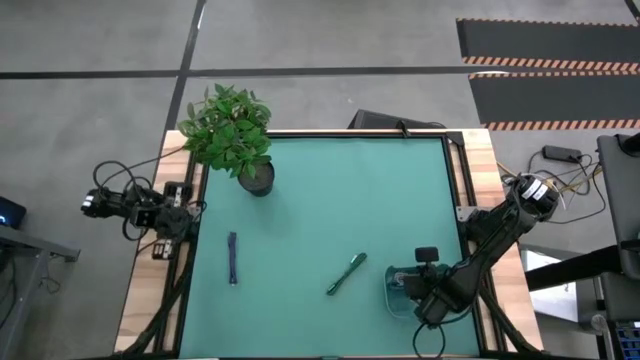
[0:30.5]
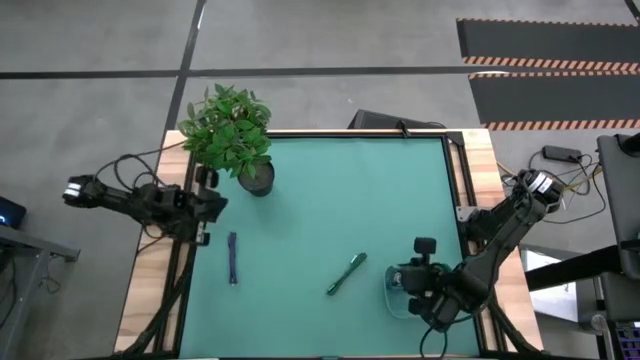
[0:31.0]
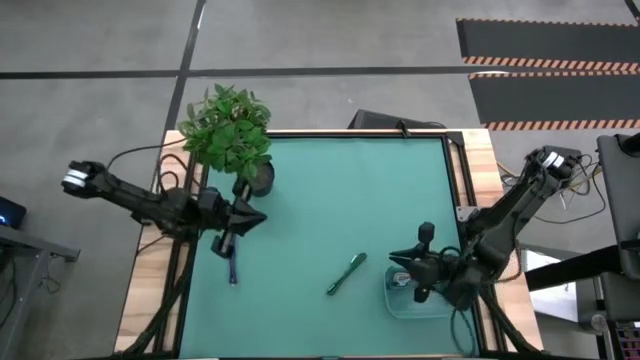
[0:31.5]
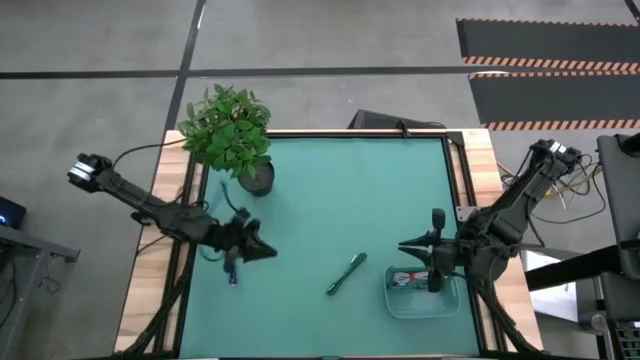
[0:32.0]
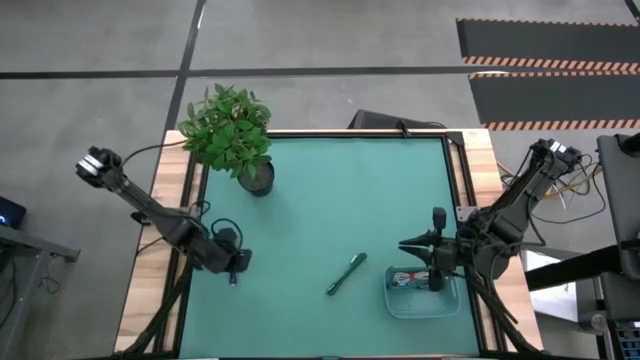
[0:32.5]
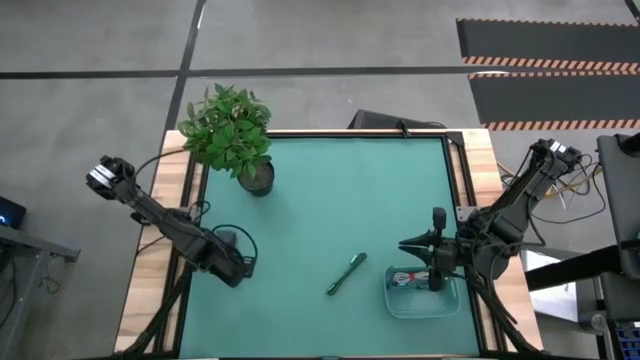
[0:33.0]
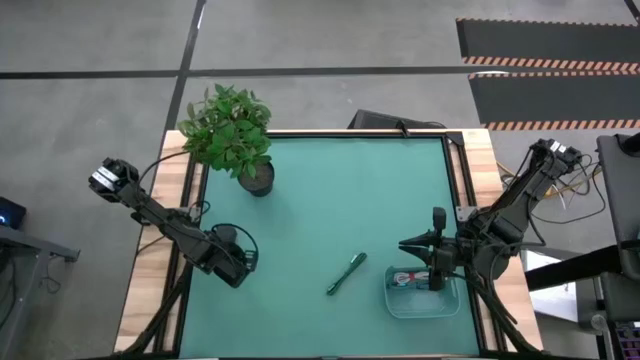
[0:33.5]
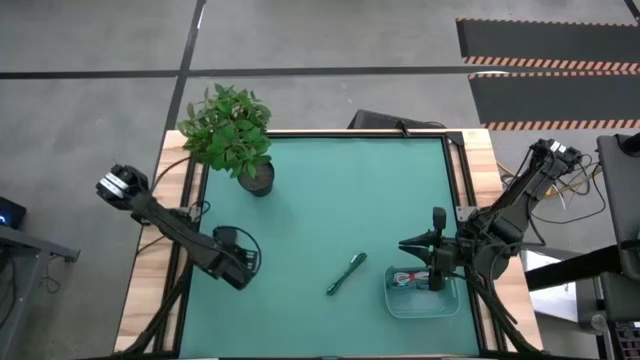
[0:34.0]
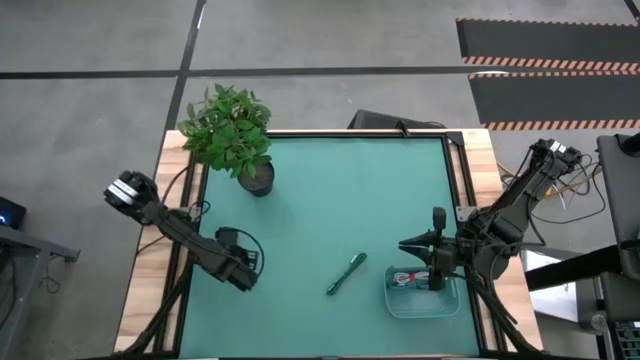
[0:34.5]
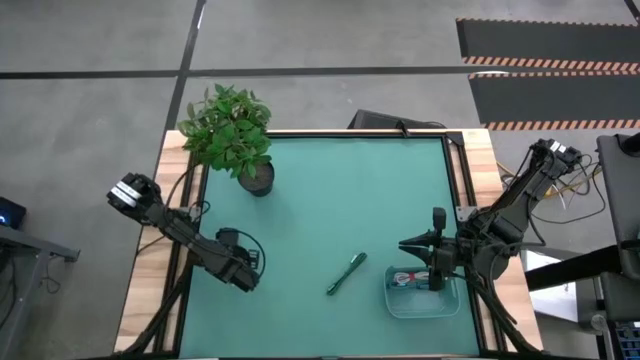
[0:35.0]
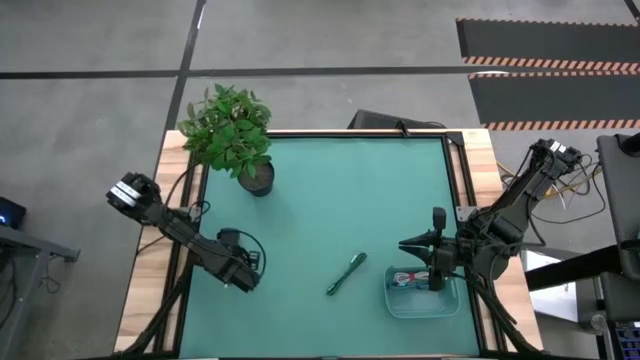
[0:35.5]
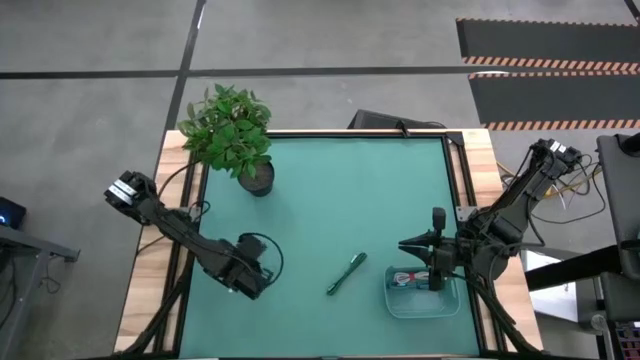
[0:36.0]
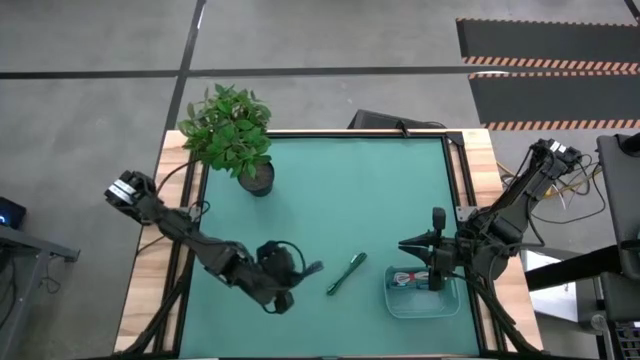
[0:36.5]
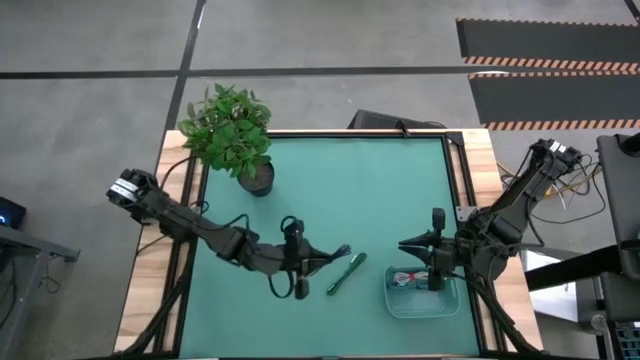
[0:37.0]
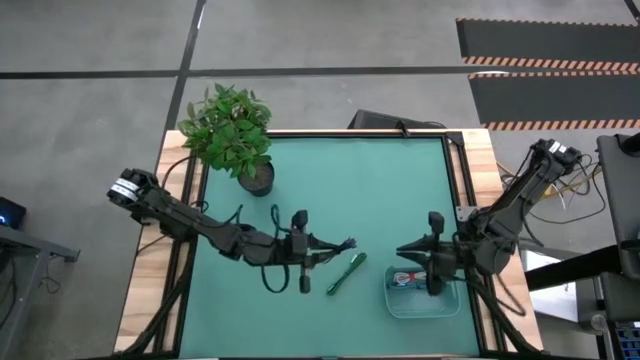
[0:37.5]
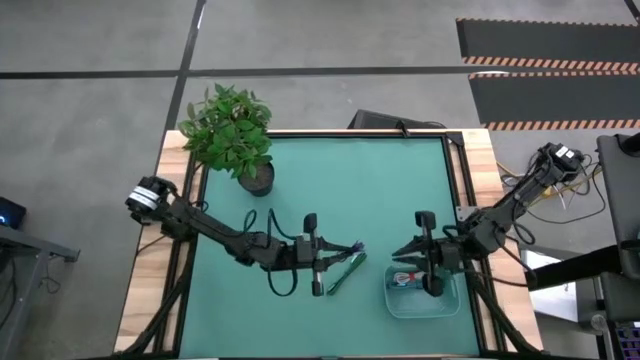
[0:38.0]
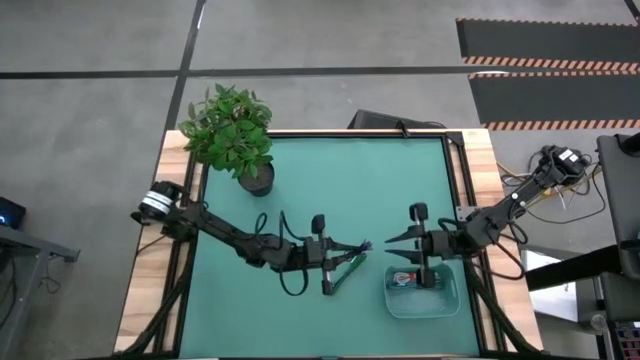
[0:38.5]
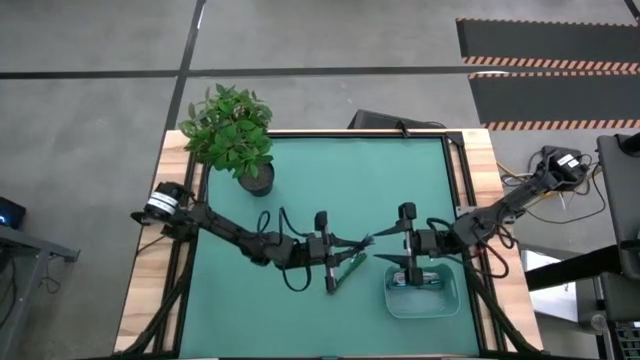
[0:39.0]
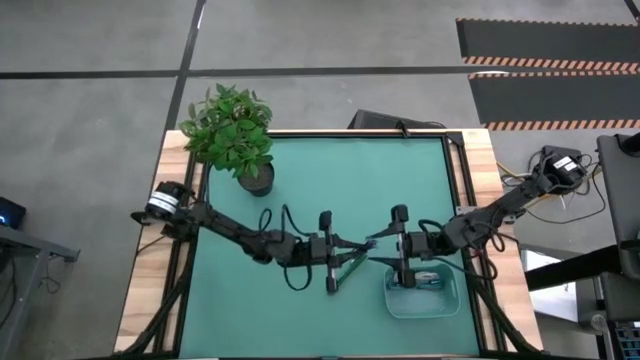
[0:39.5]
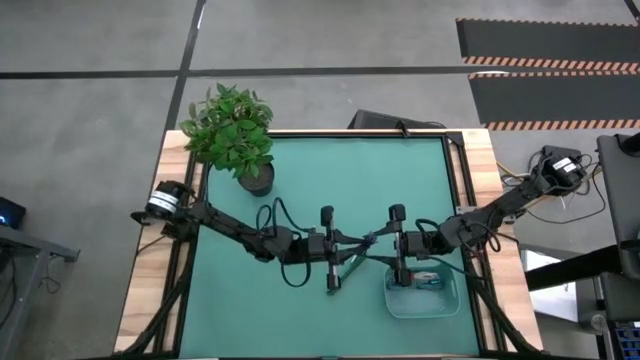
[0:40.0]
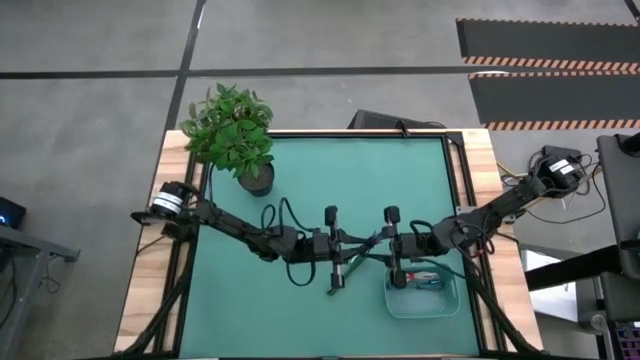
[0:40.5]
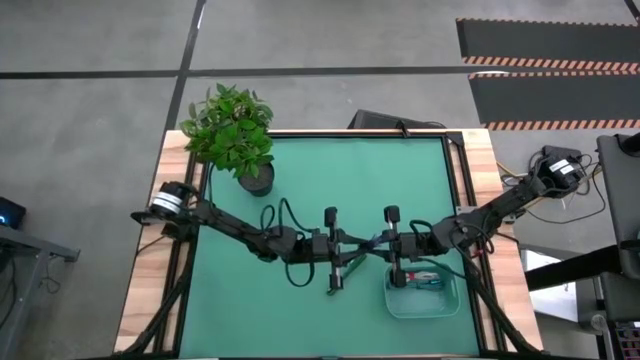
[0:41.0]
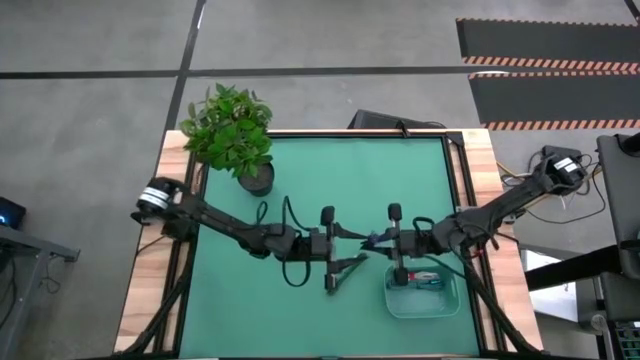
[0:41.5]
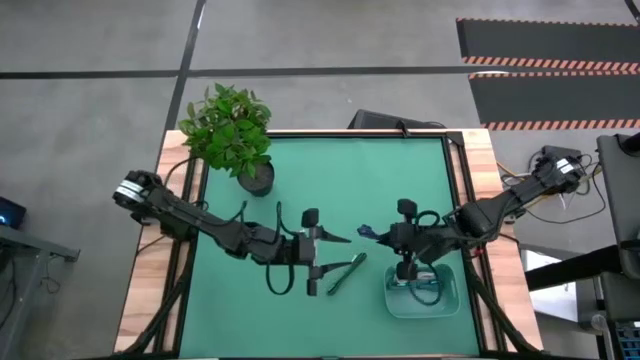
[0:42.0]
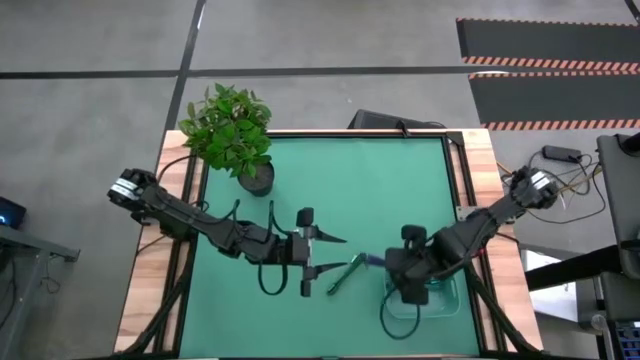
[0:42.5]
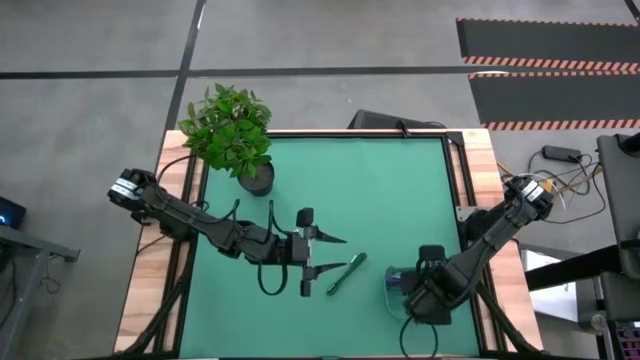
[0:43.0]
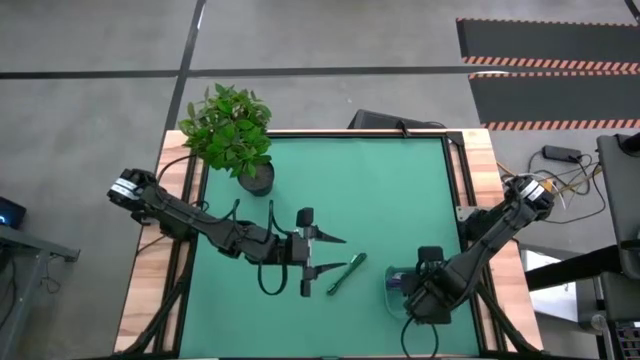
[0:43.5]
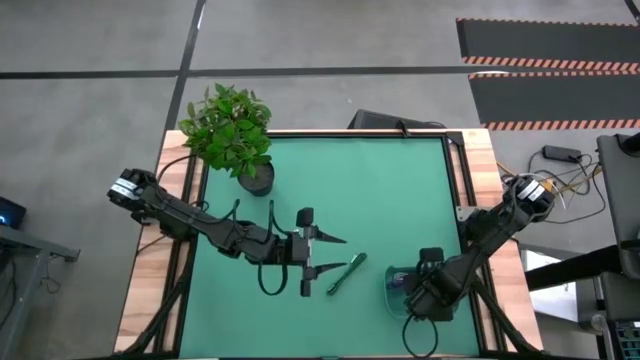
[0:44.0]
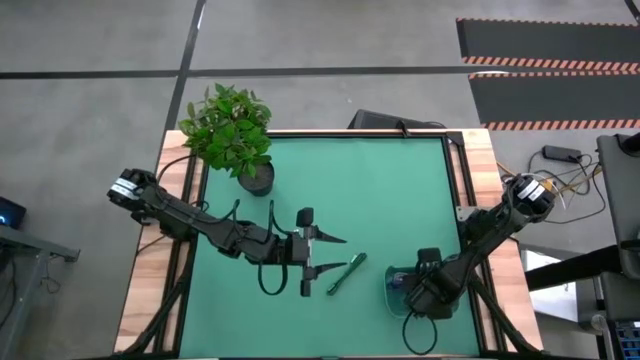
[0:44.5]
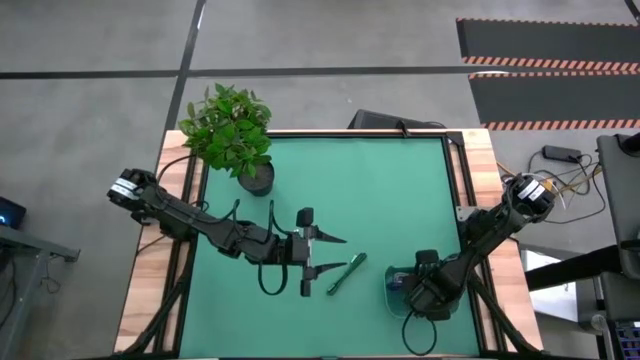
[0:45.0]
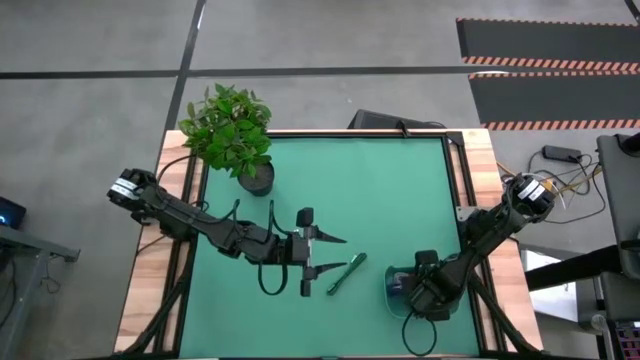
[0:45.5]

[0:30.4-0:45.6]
Task: Pick and place USB-C Cables
Put the black violet charger cable into the green bin

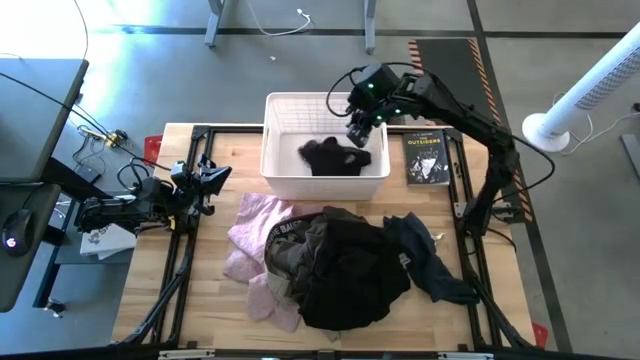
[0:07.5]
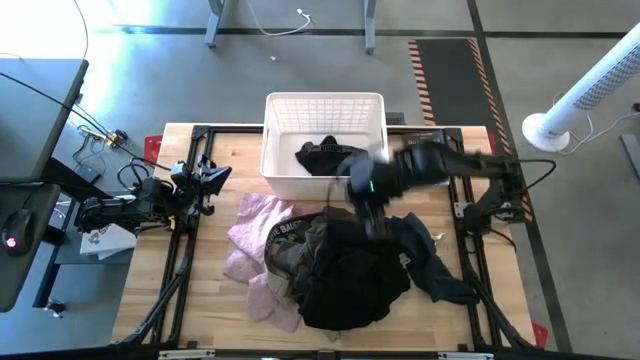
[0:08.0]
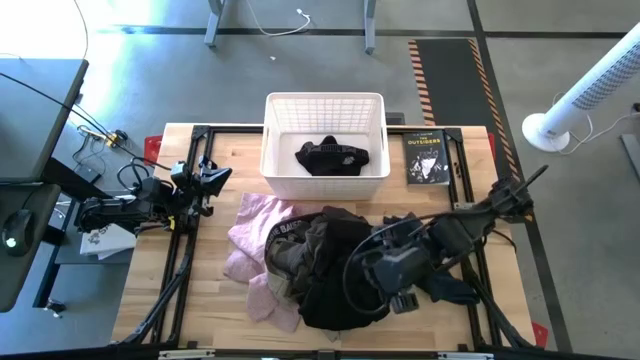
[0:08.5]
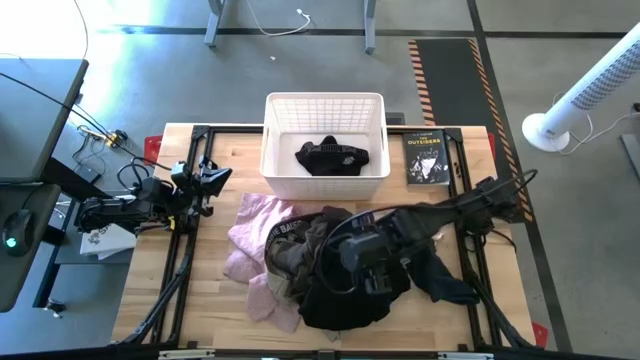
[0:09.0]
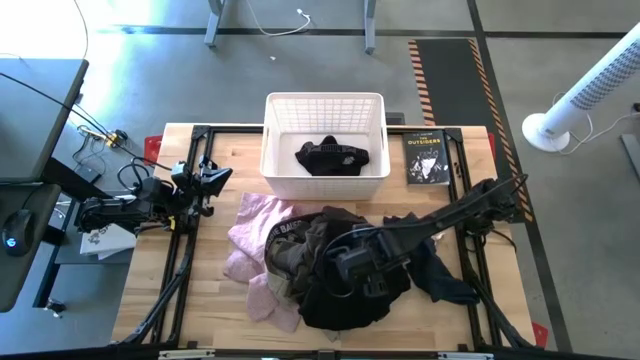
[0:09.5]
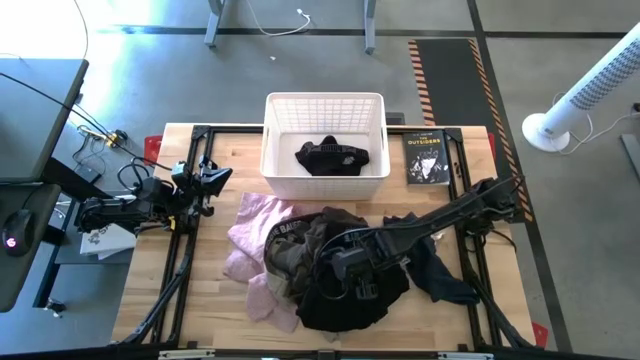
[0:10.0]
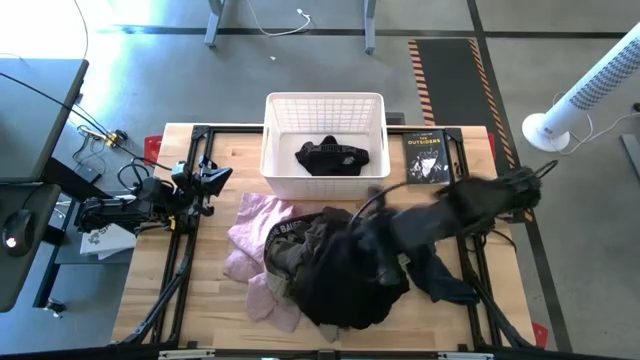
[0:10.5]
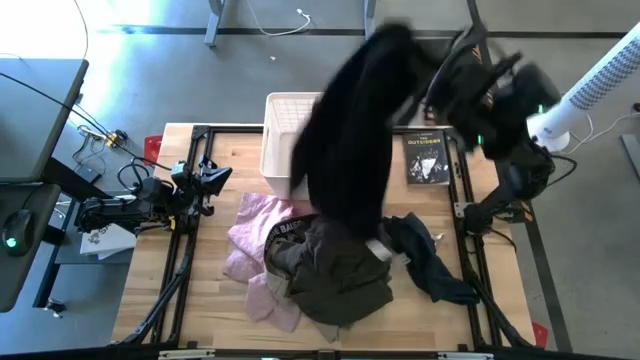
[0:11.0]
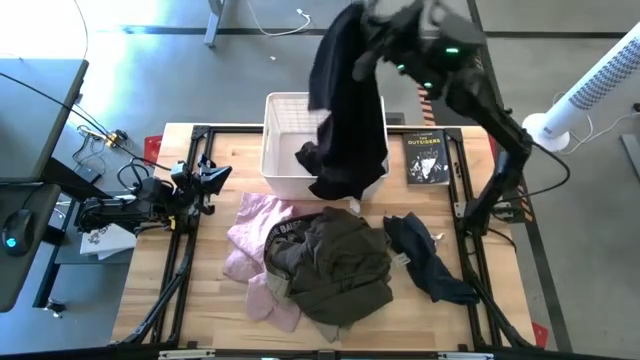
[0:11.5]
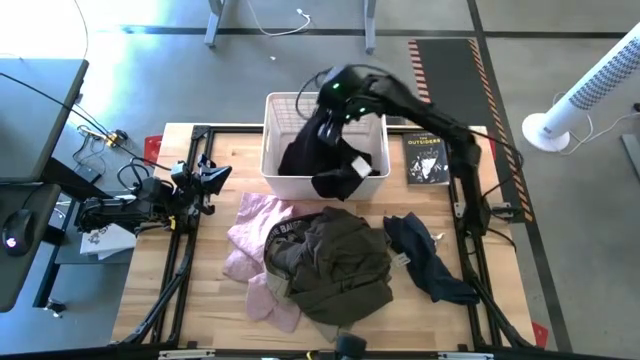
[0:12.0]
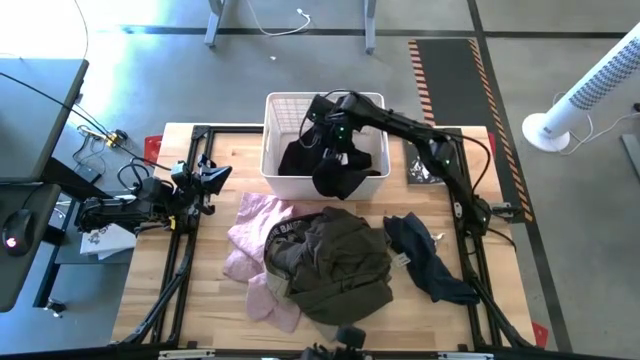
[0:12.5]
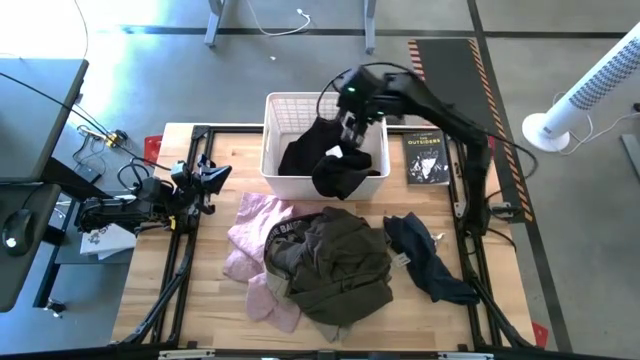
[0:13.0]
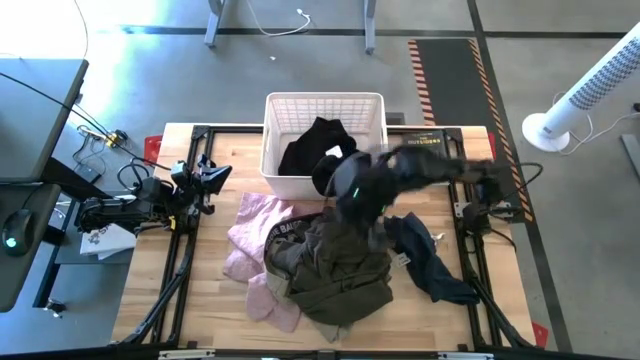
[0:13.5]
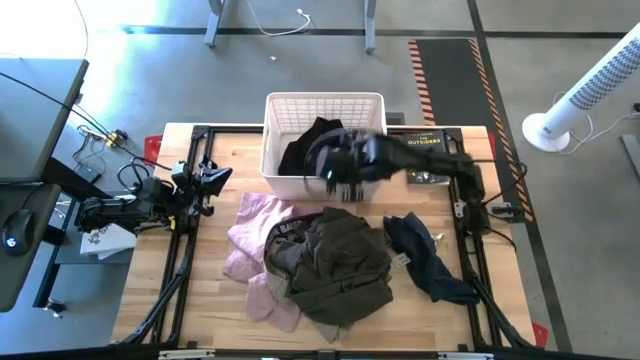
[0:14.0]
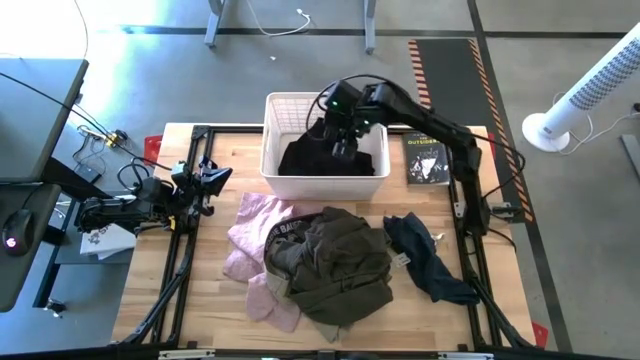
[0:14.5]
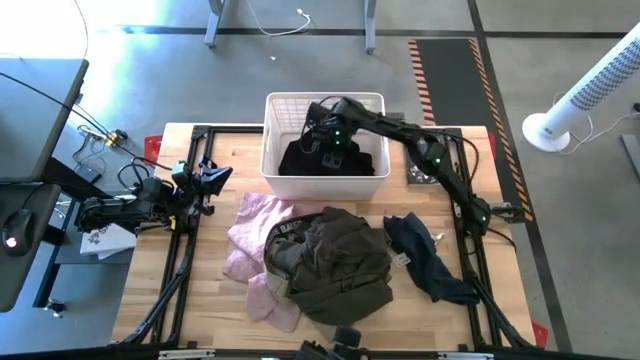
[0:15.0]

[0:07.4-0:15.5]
Task: Sort clothes
Put the black shirt into the white bin
